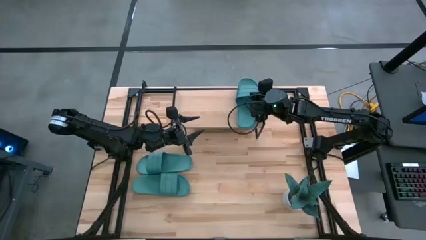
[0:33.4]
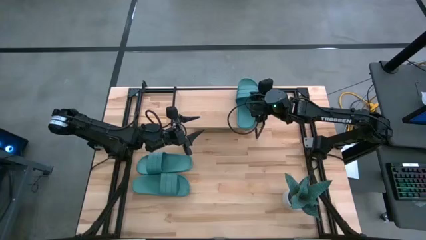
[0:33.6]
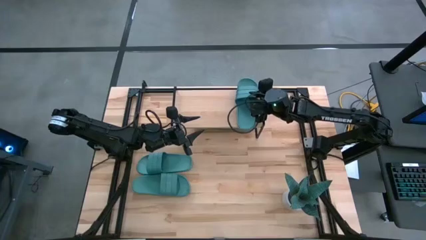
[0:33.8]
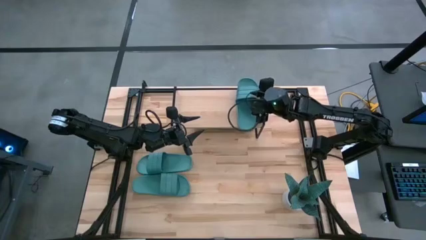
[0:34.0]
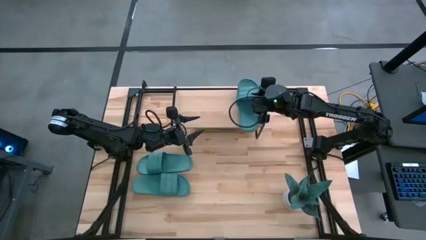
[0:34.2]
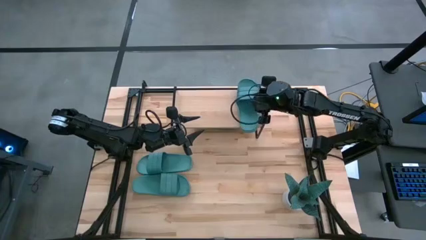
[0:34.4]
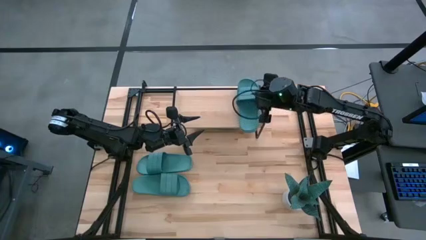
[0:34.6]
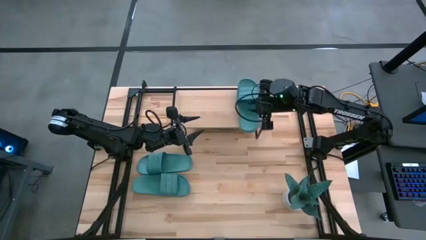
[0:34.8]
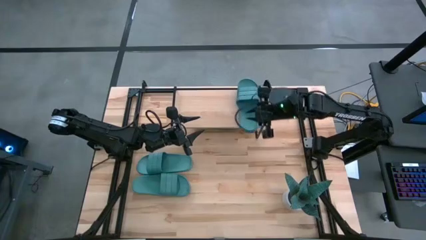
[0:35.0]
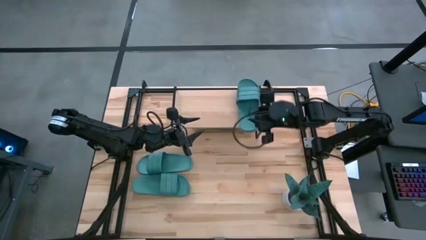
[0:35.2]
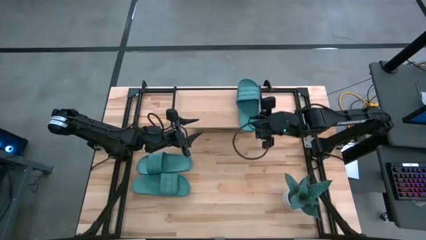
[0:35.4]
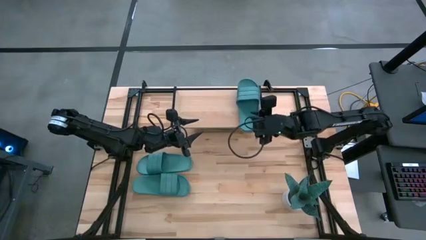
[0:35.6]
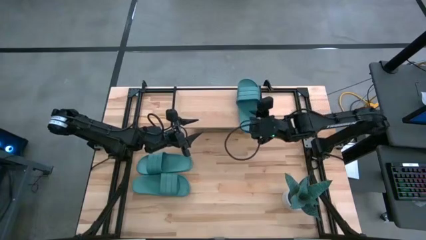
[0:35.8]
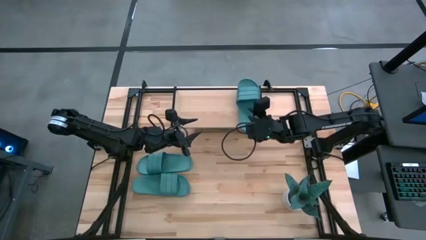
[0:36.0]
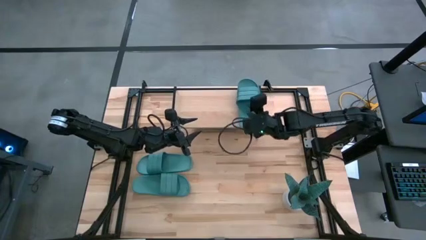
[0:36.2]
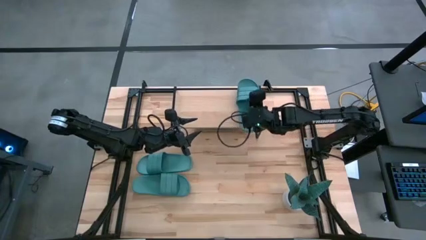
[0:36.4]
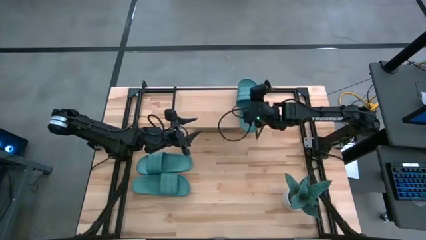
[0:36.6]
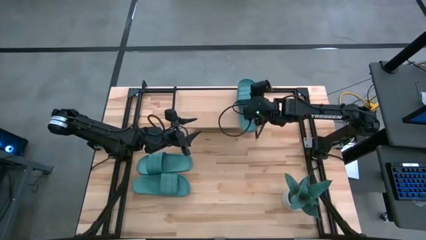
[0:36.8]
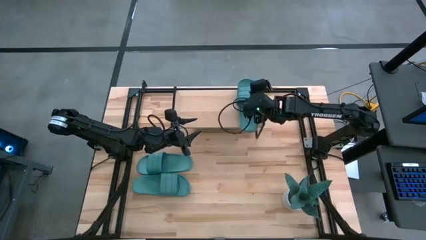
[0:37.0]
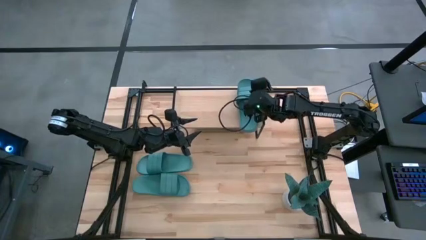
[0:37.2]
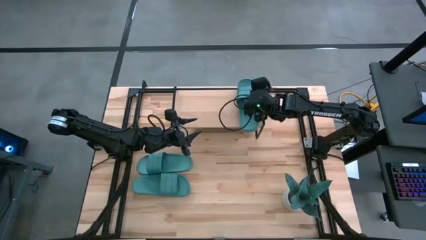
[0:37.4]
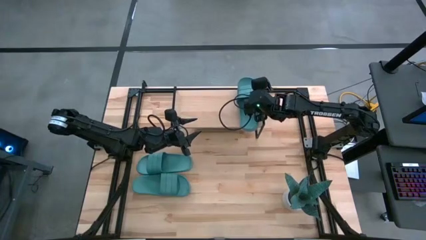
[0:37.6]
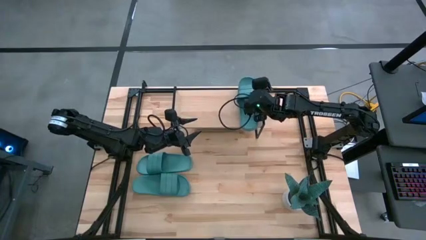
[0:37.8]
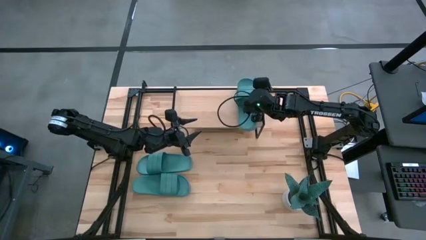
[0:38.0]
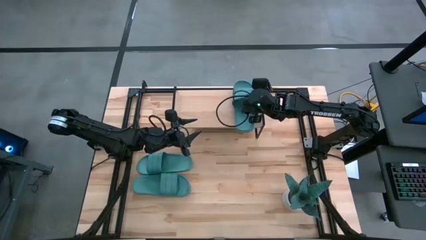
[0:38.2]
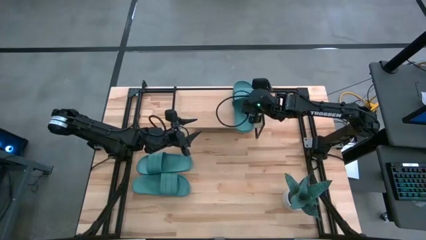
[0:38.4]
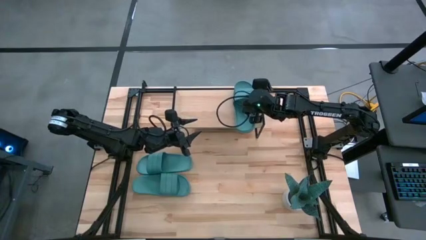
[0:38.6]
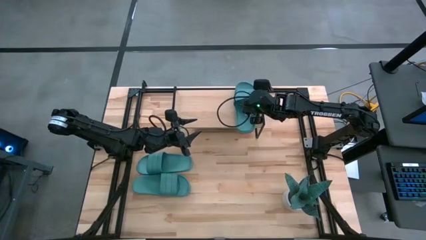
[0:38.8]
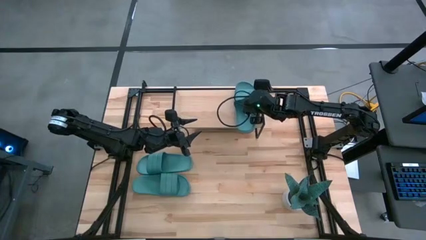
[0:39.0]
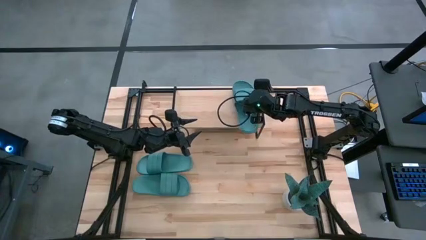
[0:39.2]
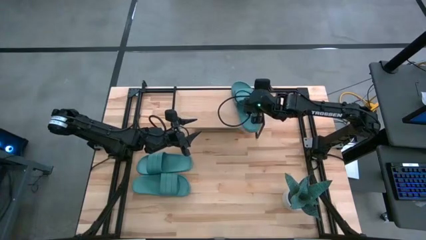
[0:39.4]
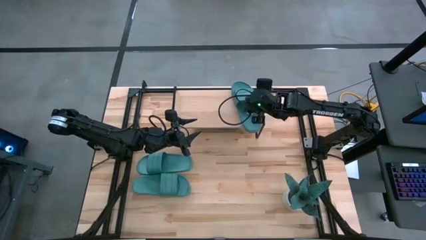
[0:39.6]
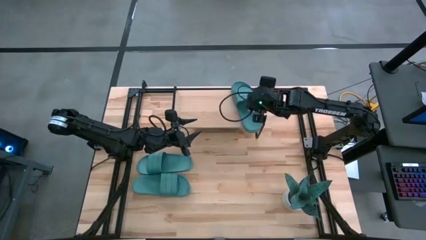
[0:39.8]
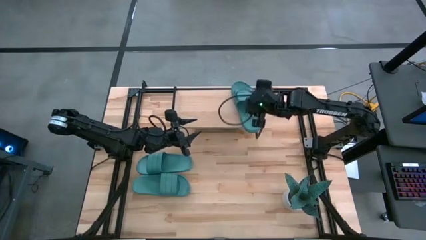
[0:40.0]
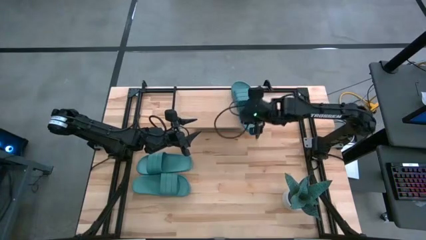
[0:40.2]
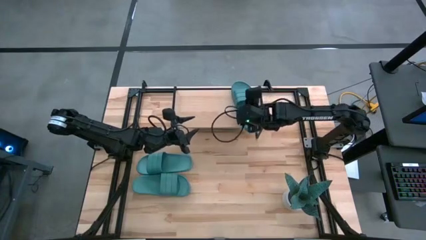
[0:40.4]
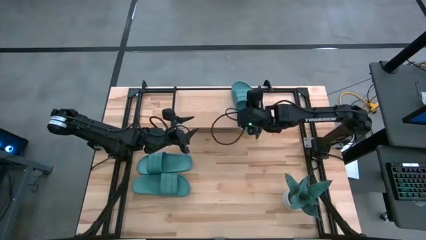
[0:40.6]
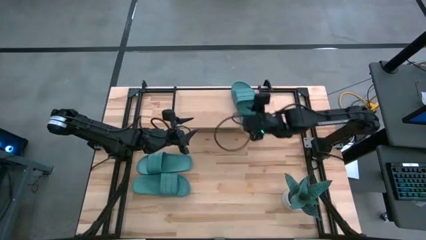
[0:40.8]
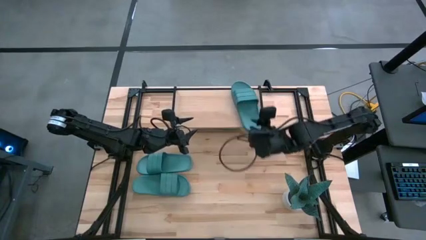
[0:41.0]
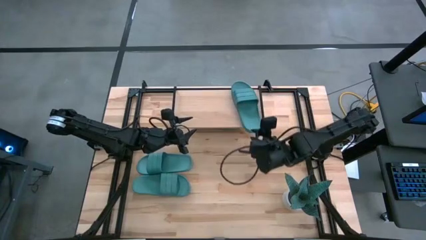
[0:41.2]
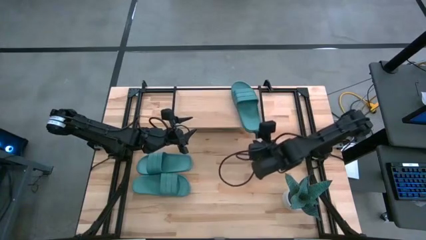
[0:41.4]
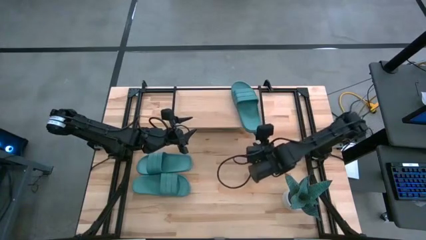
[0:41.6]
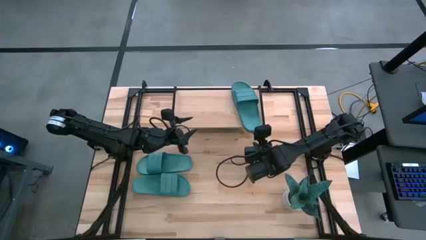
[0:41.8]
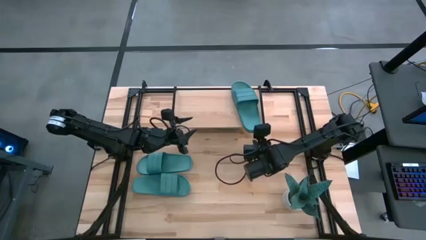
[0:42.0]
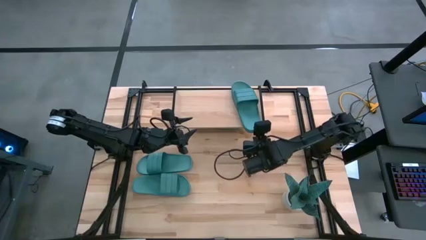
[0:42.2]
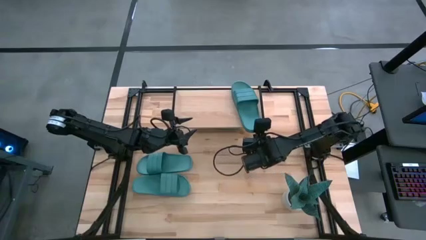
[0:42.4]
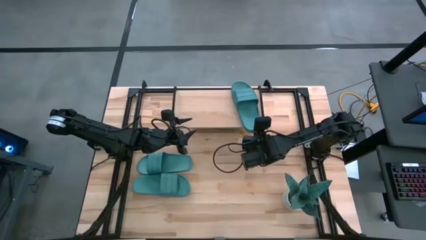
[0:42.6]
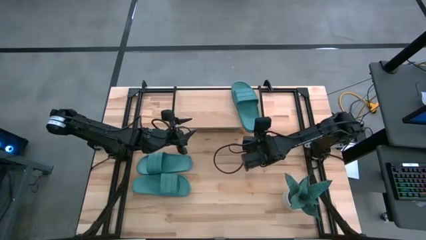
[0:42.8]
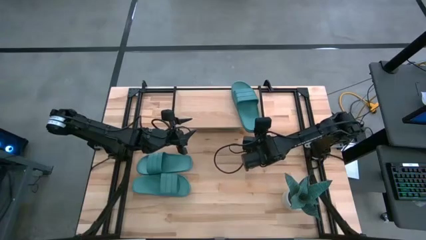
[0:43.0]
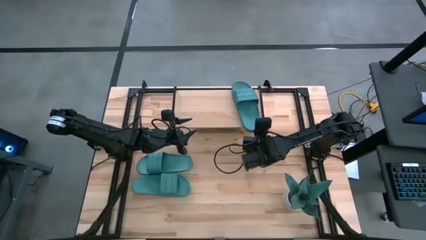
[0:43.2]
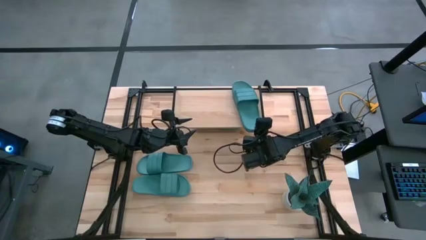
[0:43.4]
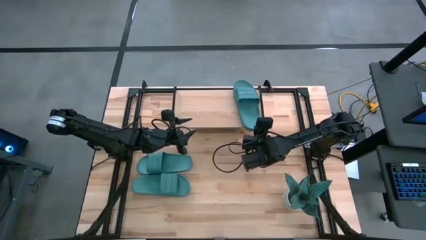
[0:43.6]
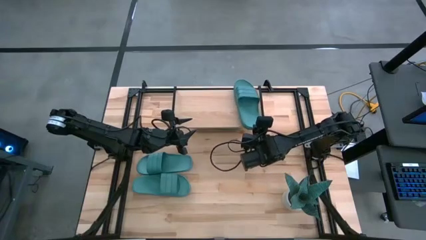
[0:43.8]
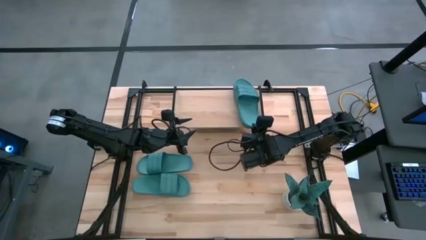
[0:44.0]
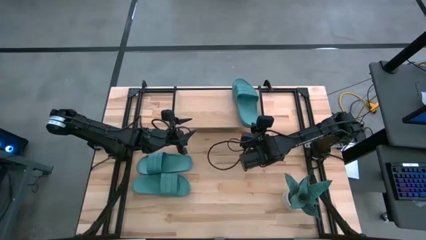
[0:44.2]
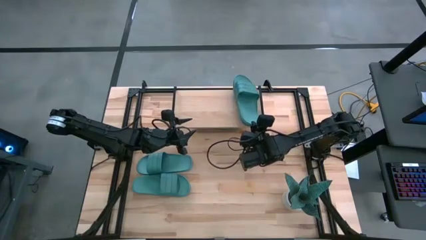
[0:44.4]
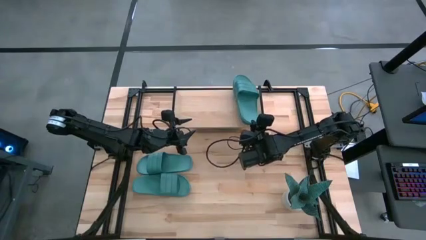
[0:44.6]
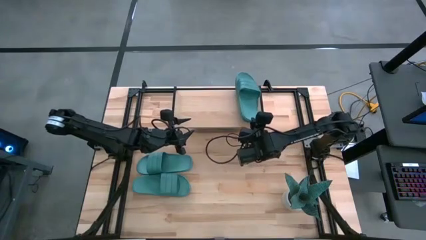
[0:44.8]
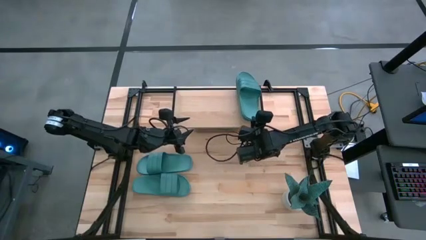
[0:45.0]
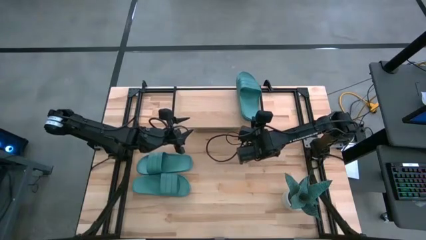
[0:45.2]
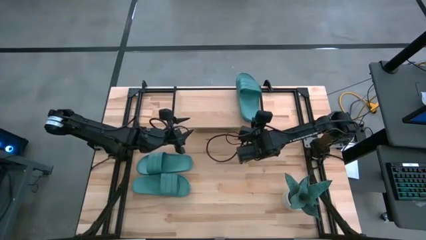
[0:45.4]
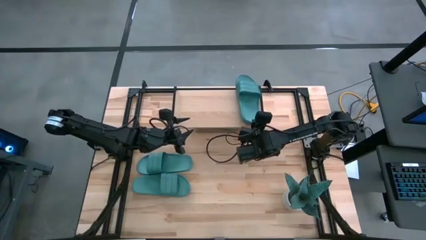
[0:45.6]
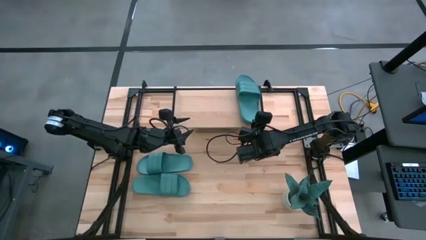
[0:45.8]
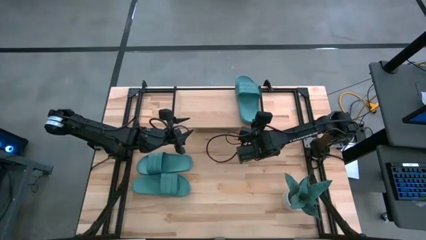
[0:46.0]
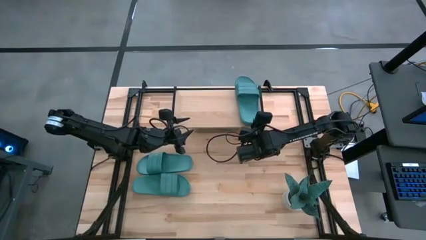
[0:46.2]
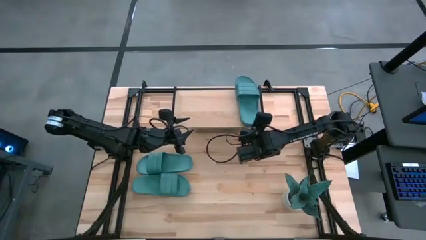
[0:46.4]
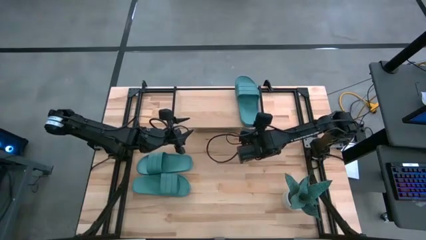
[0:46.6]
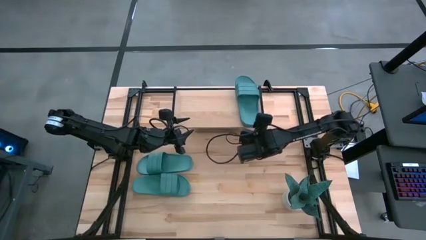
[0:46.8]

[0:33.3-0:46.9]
Task: Pick and place slides into the shelf
Put the green slides on the shelf
